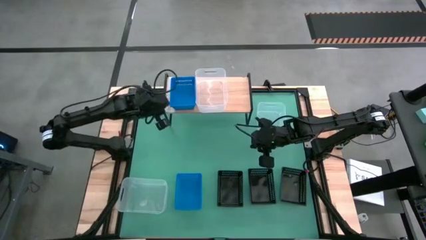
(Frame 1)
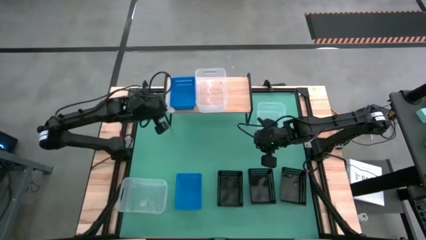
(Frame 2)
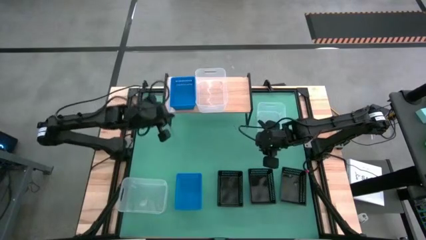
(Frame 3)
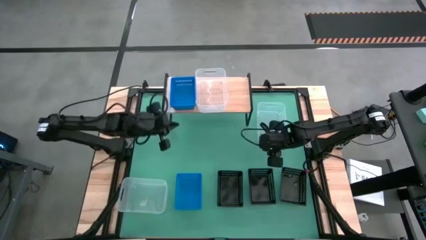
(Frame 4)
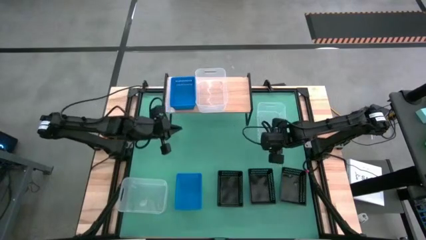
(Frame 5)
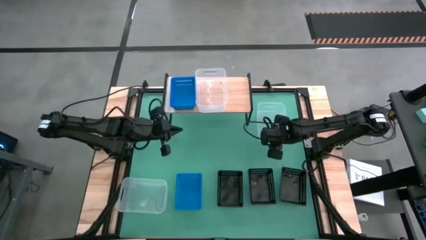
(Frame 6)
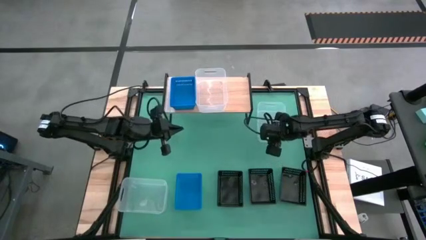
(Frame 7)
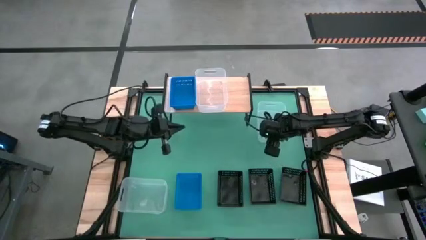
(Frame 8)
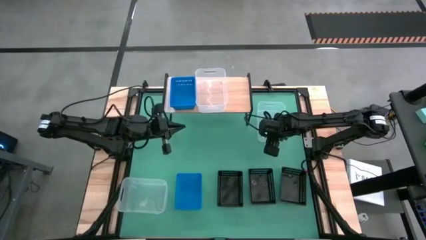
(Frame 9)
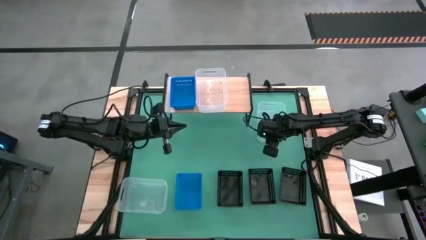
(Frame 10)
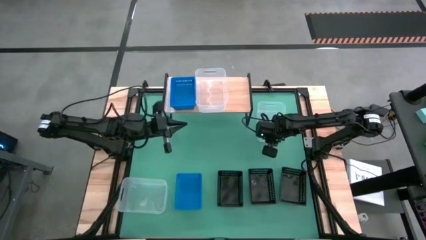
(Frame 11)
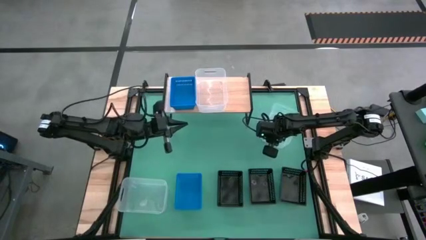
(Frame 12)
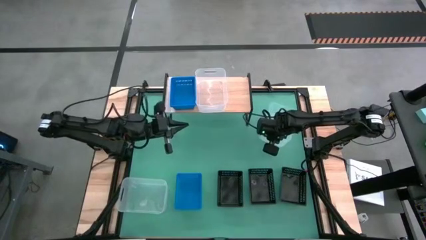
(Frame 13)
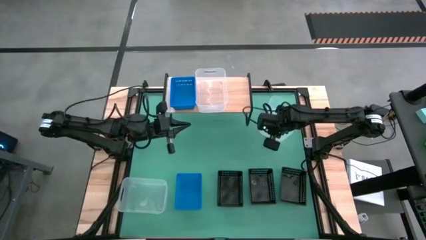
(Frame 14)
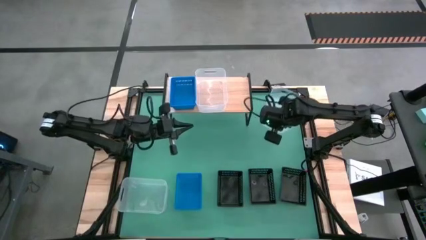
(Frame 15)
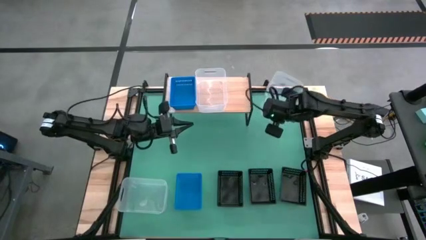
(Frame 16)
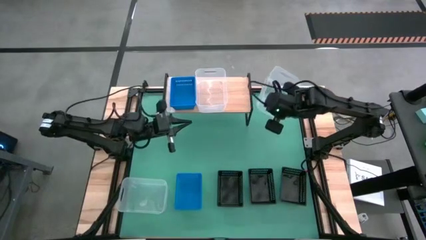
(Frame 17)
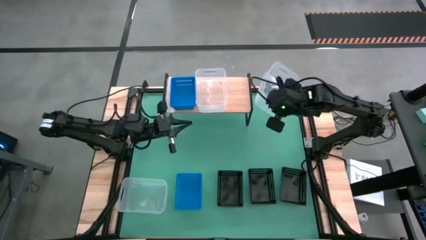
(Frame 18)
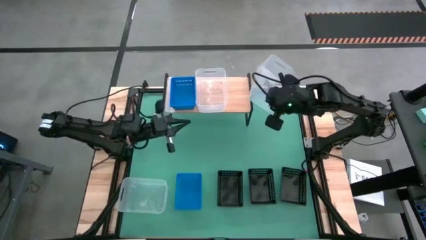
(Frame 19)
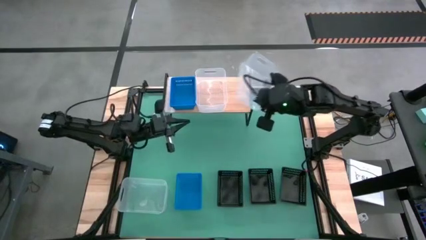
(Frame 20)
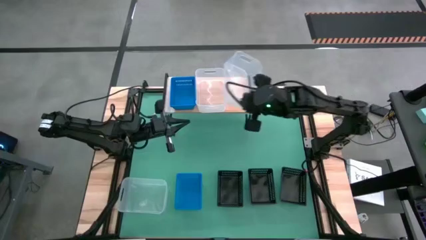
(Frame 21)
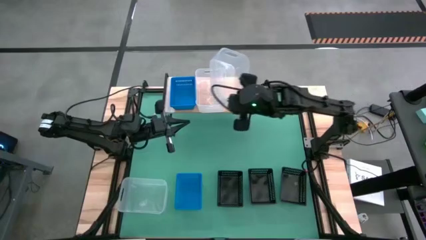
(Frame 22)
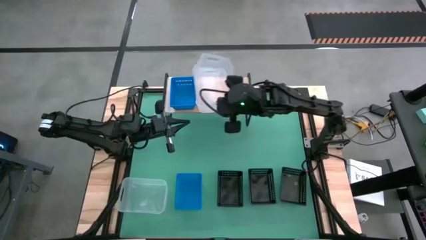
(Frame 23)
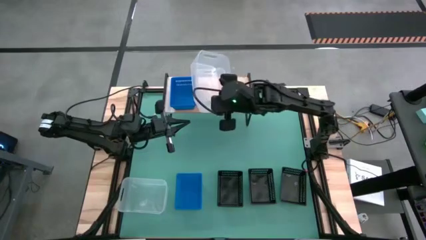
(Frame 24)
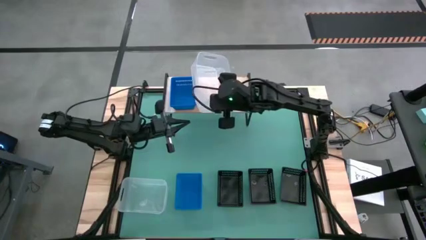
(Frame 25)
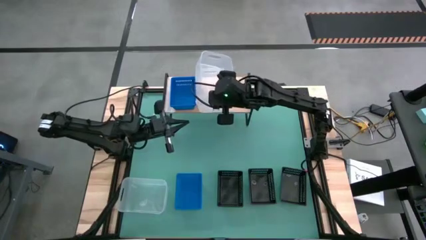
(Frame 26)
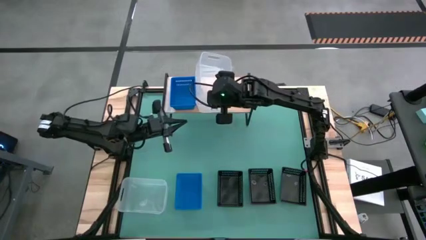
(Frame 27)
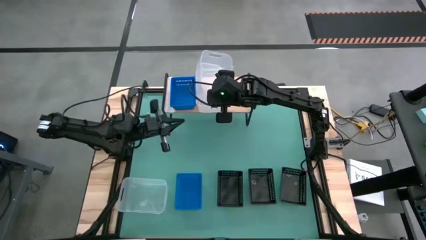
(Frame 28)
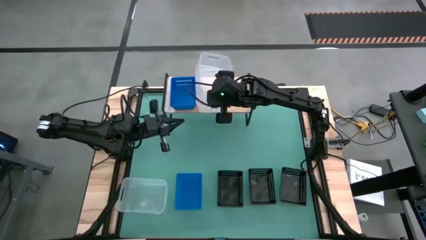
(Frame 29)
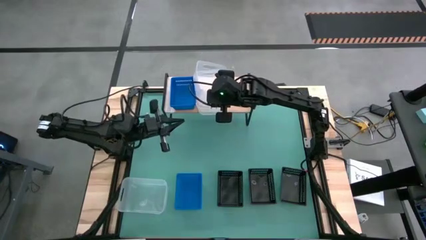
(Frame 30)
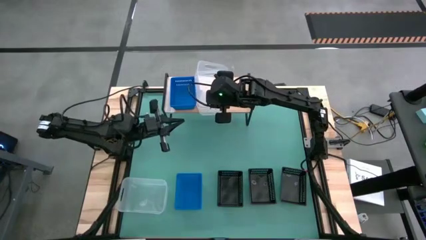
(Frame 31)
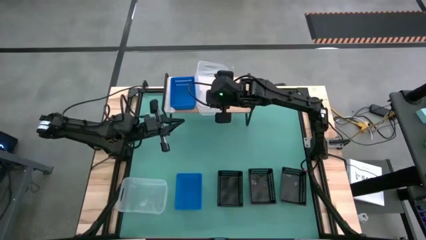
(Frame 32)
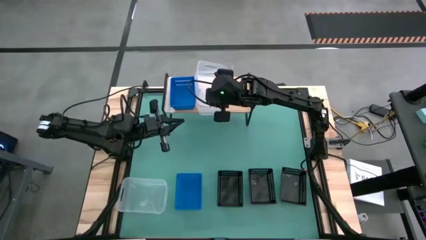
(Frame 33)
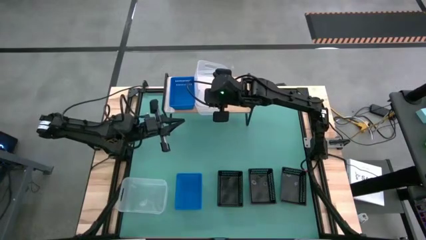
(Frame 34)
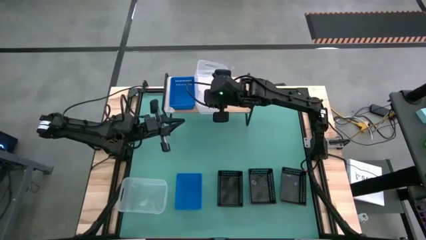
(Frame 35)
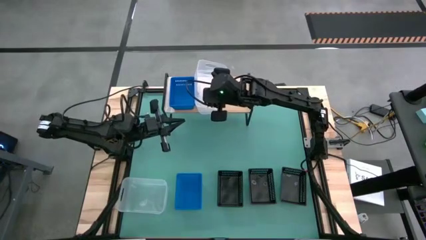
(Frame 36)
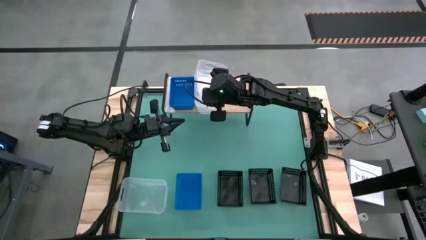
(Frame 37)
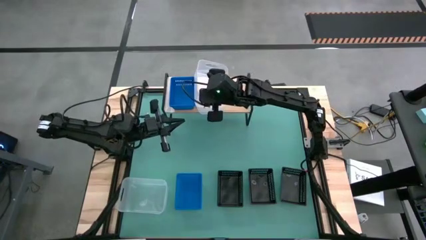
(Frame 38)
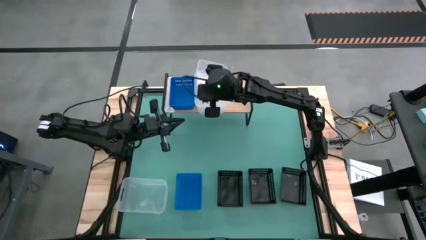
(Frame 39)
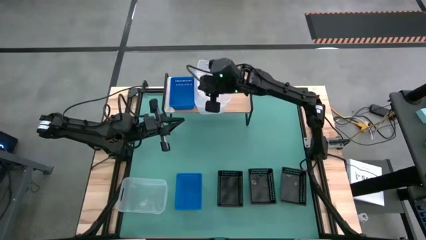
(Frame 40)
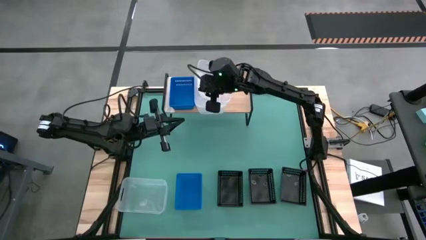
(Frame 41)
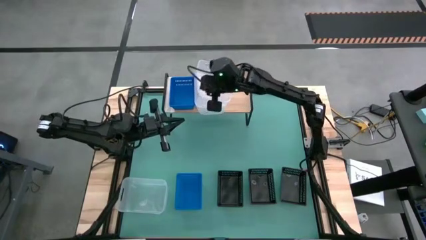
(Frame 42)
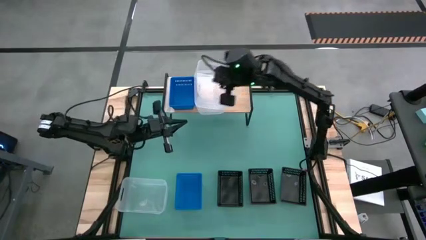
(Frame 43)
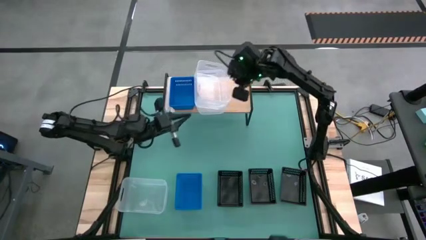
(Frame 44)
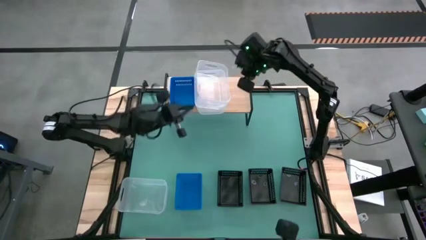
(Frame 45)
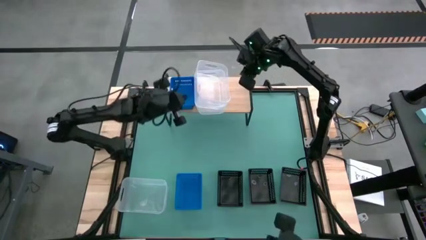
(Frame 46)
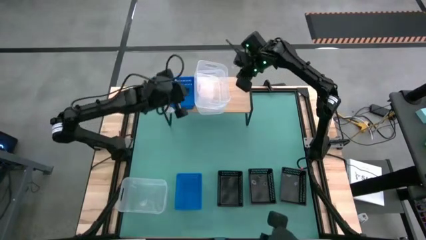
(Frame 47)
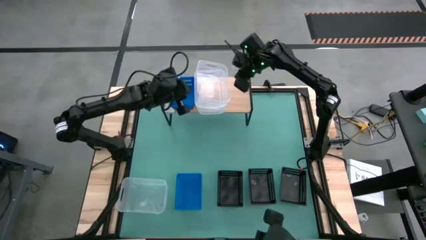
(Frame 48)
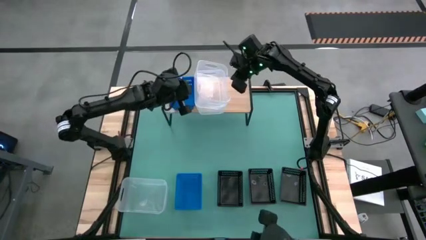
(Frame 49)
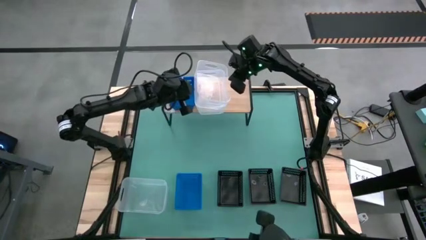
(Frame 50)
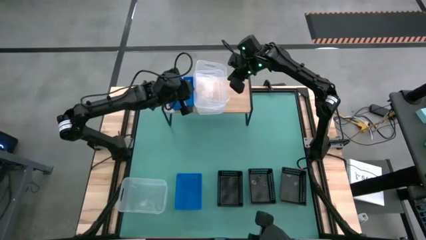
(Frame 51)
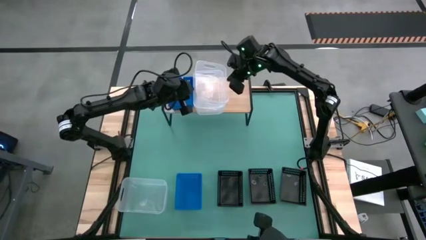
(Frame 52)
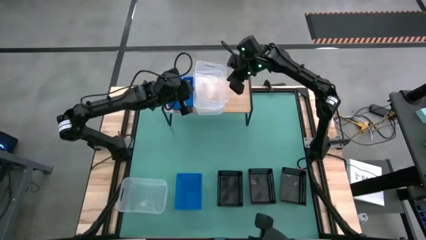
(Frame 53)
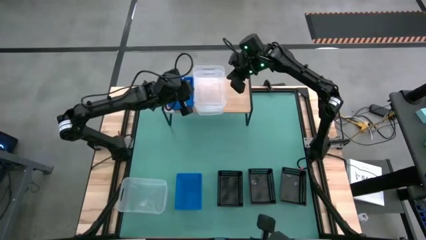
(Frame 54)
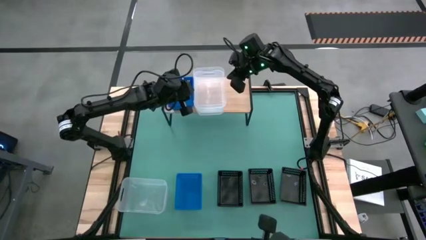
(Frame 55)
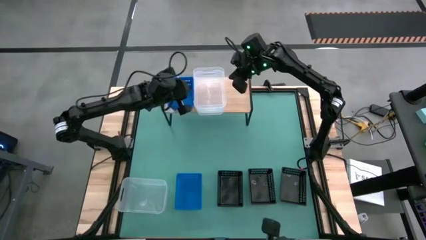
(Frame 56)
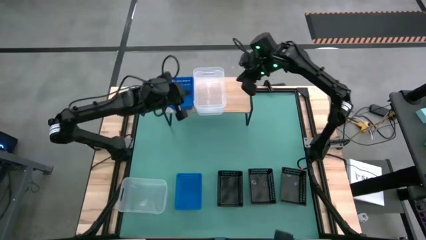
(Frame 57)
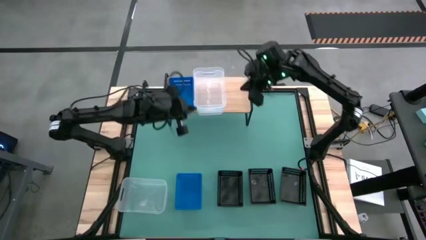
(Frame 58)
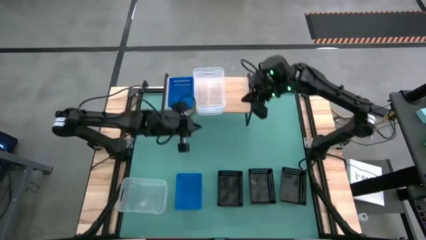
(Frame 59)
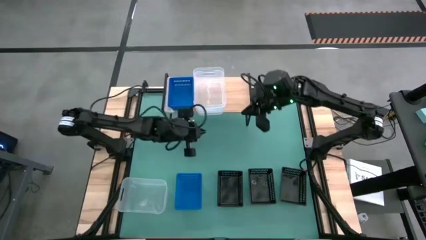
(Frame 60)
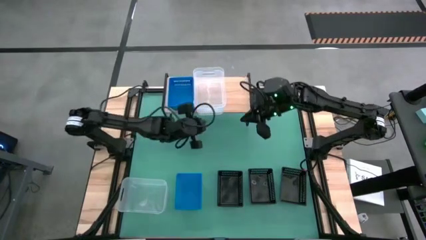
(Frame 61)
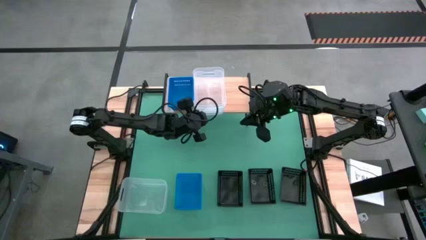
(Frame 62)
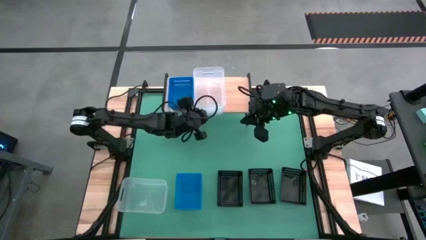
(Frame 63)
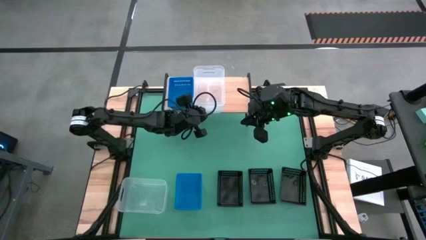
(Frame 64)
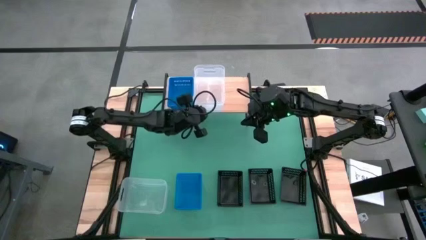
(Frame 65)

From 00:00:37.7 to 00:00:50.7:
Task: Stack baskets on shelf by color
Stack the top transparent bin on the transparent bin on the shelf

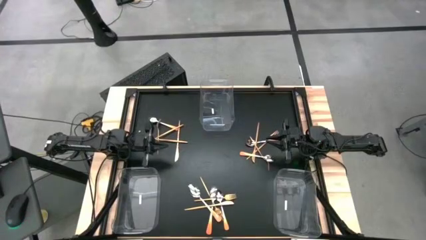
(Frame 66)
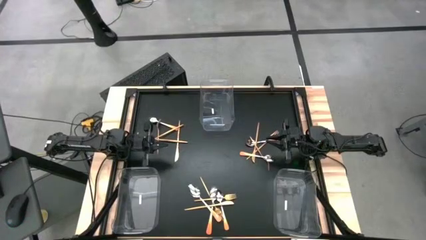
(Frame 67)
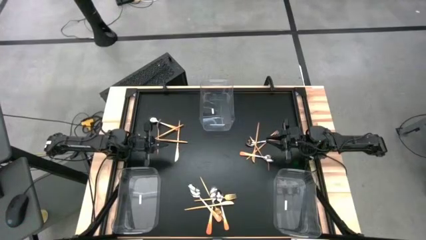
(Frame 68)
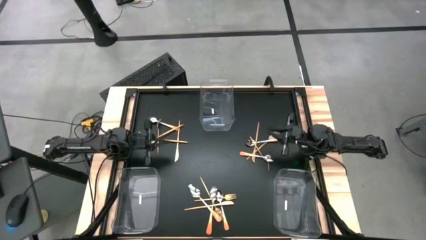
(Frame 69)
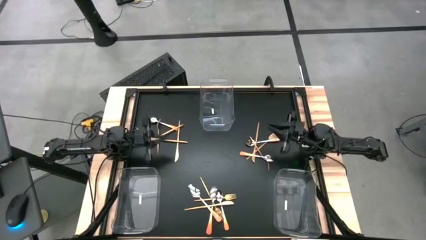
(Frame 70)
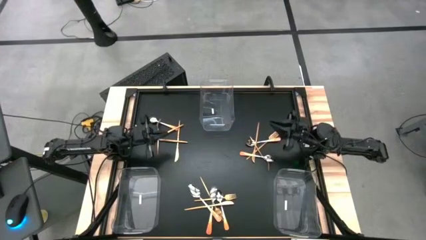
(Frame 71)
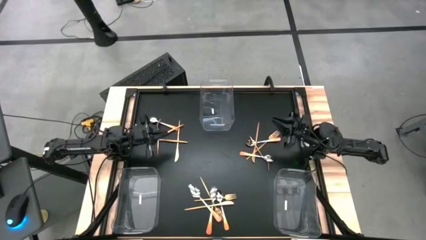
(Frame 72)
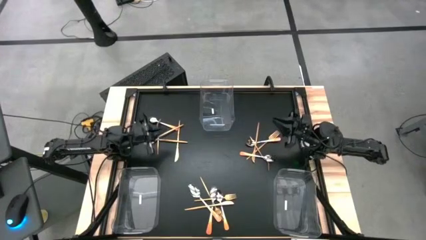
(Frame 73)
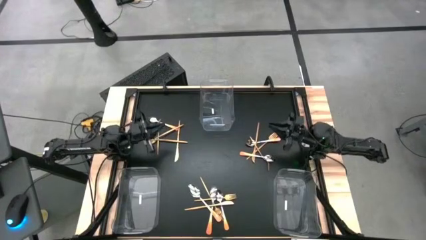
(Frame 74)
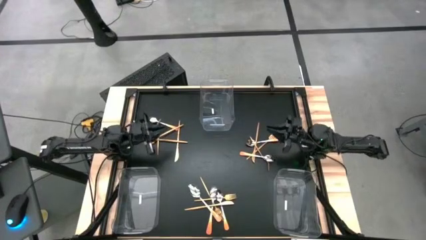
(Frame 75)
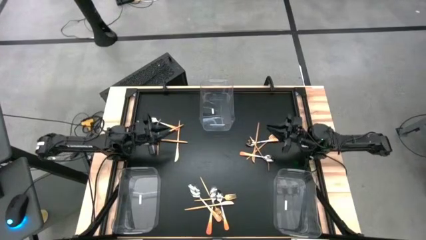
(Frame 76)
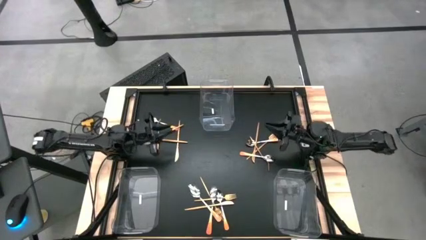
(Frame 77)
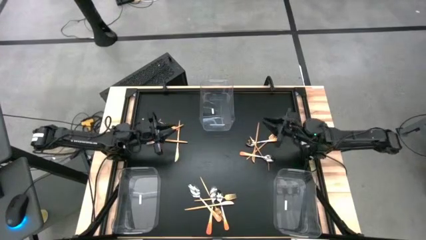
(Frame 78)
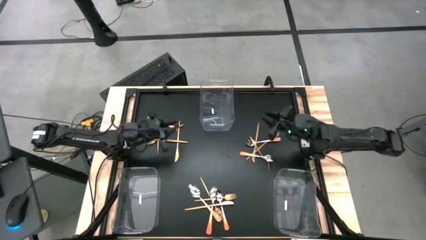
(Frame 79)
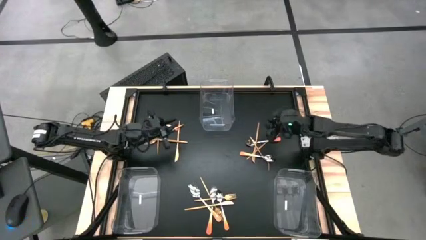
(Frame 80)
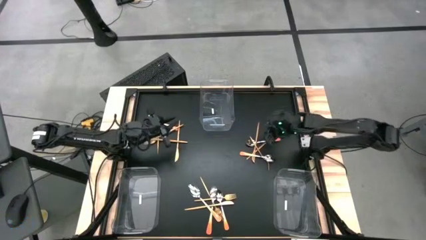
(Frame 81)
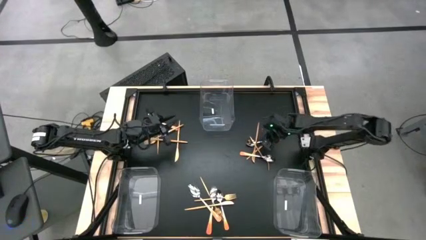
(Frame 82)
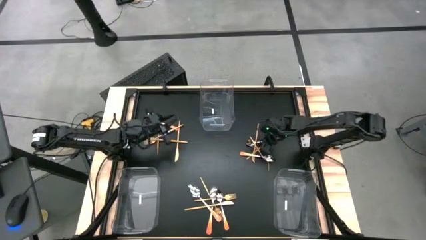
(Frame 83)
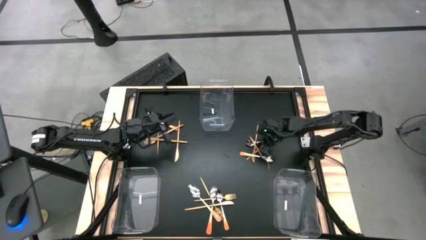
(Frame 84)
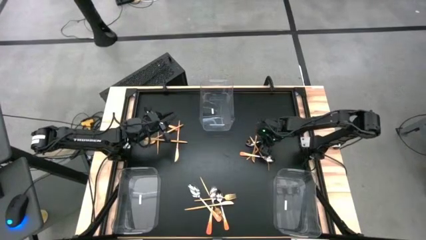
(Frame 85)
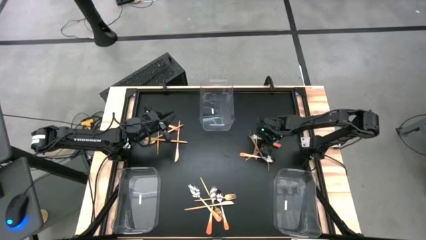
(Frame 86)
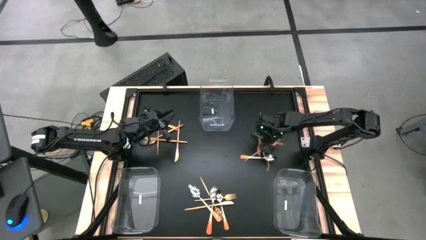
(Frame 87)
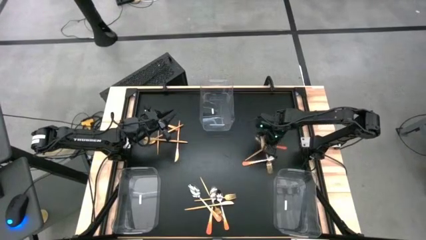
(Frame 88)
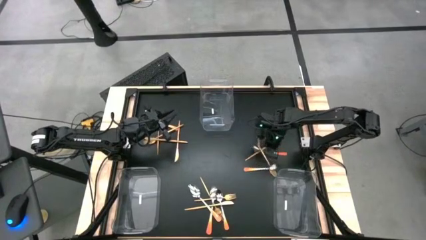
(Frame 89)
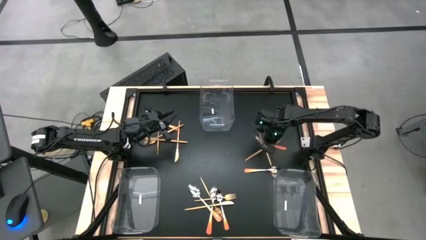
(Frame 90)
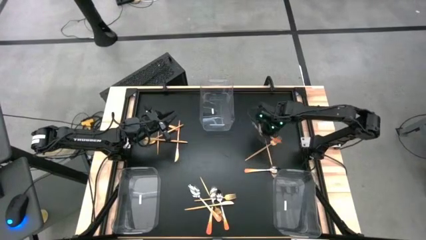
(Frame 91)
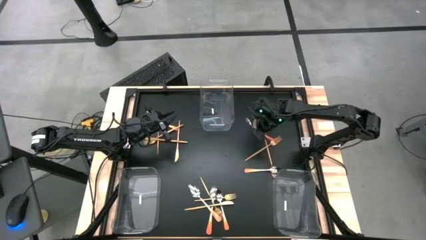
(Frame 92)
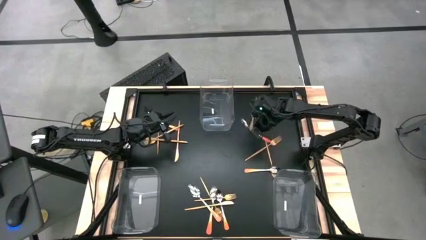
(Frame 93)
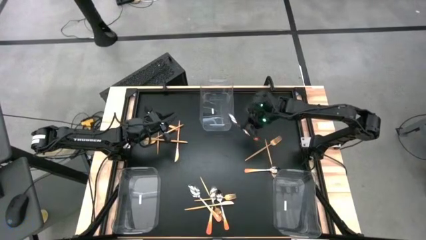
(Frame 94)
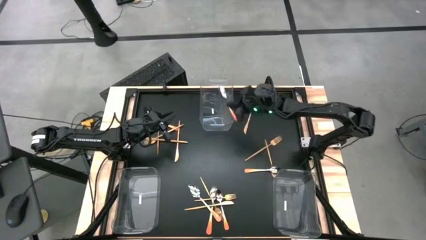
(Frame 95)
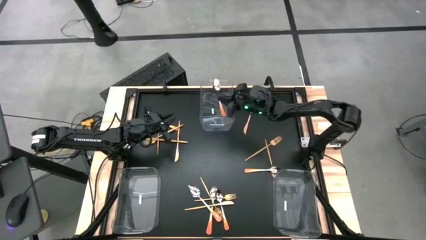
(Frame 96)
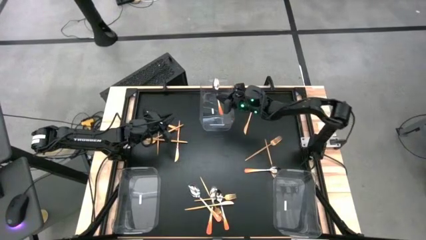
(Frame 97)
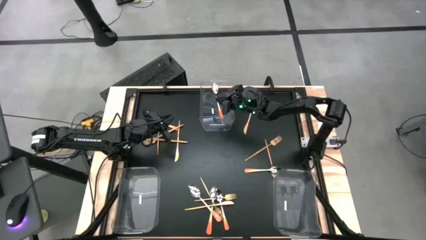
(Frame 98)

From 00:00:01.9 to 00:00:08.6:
Task: Sort silverware by color (type)
Put the orange spoon into the top transparent bin
